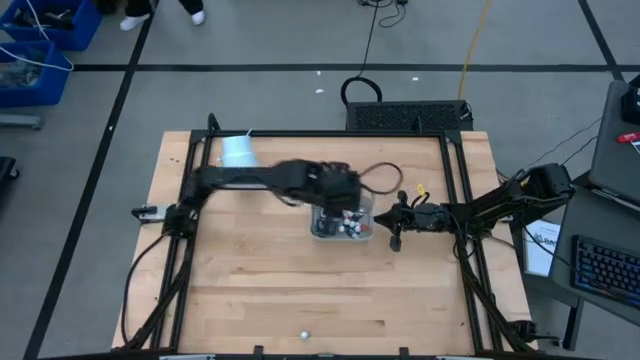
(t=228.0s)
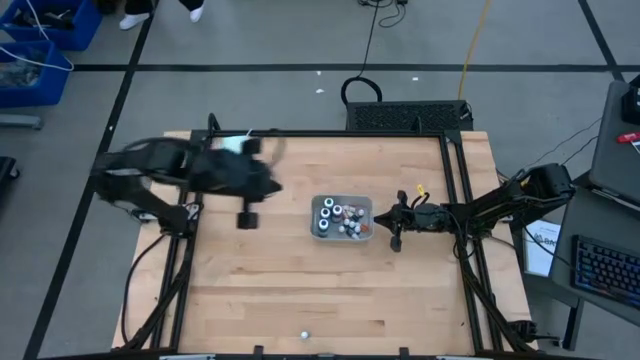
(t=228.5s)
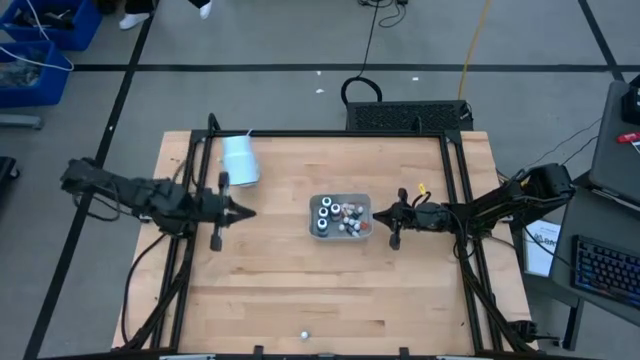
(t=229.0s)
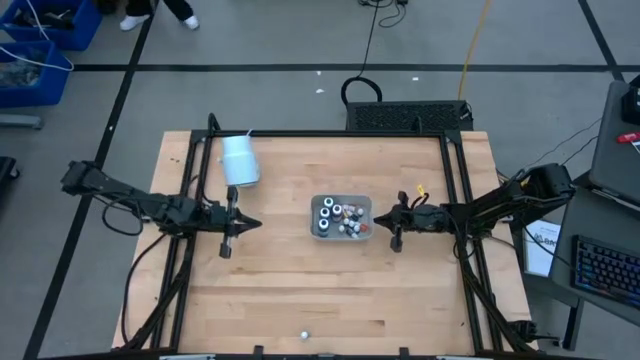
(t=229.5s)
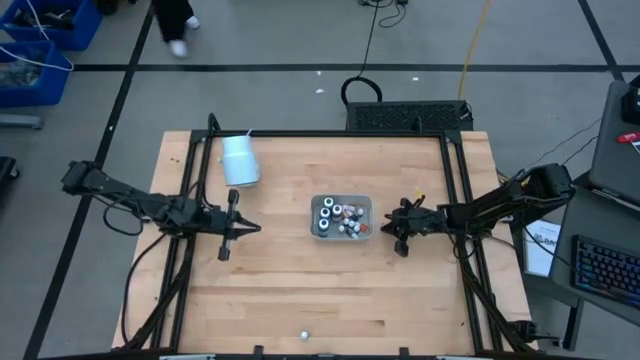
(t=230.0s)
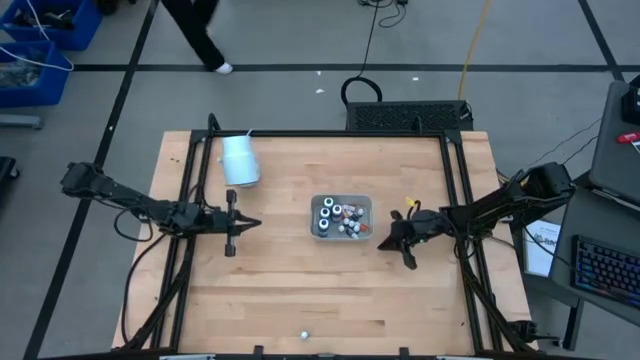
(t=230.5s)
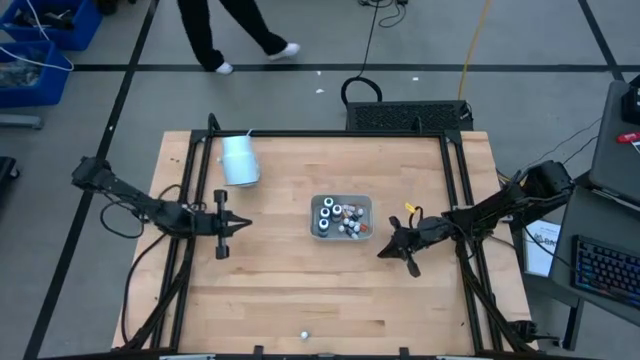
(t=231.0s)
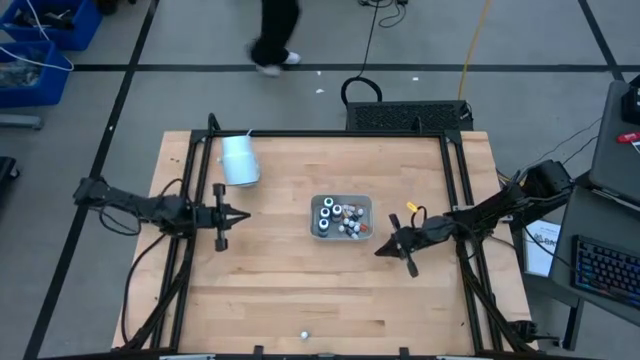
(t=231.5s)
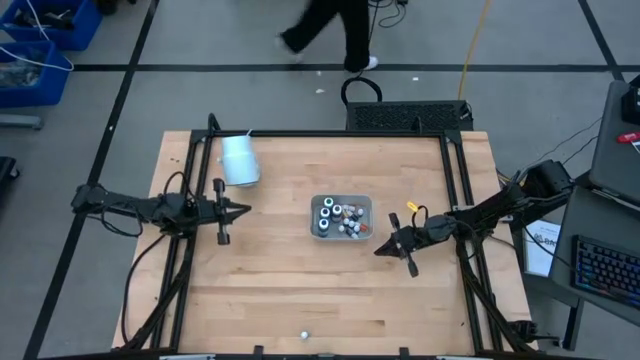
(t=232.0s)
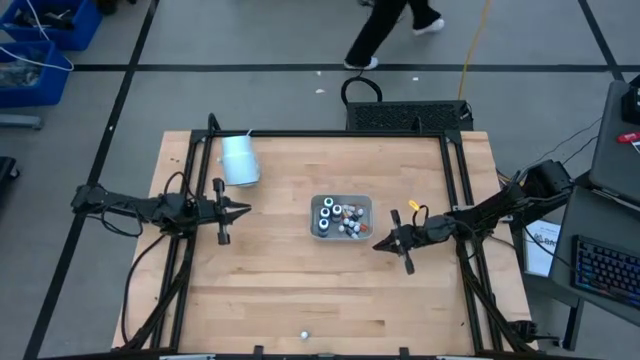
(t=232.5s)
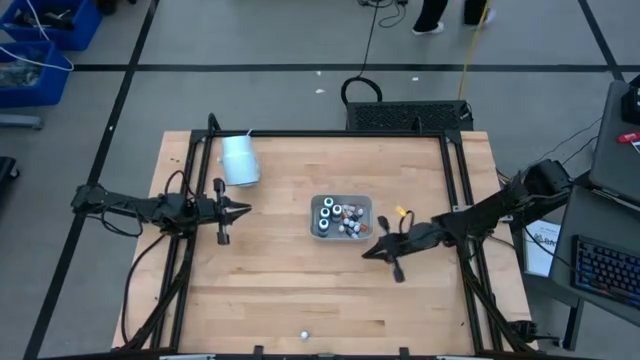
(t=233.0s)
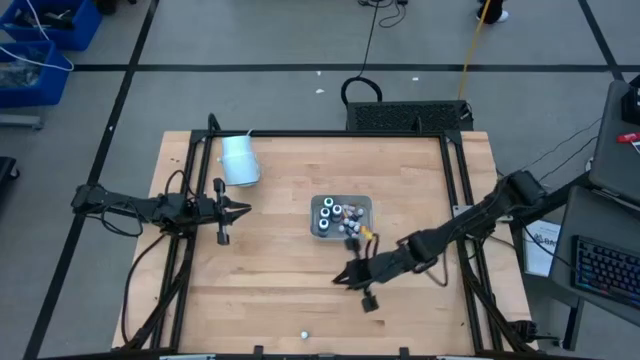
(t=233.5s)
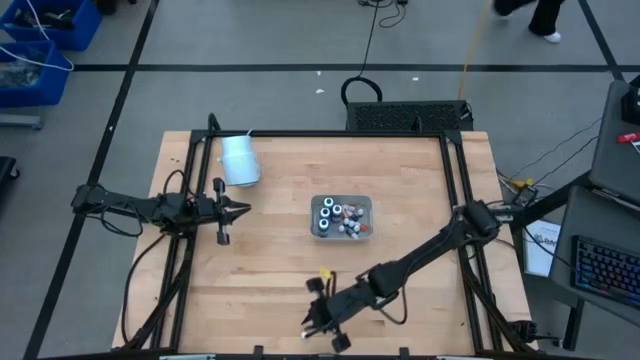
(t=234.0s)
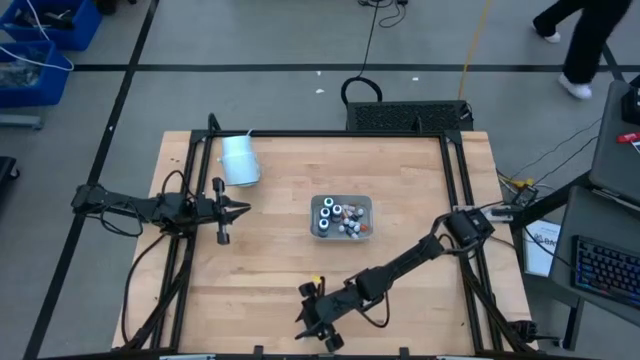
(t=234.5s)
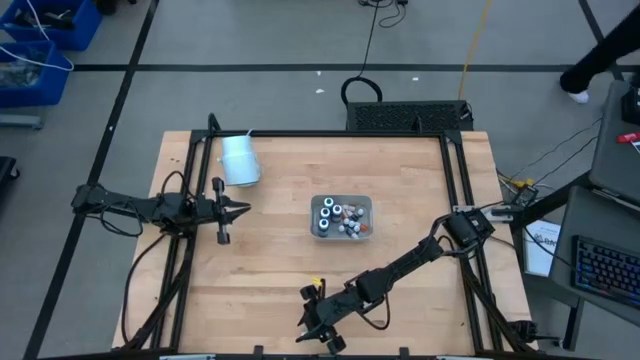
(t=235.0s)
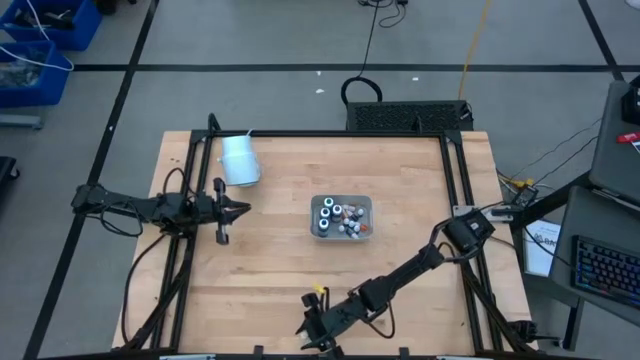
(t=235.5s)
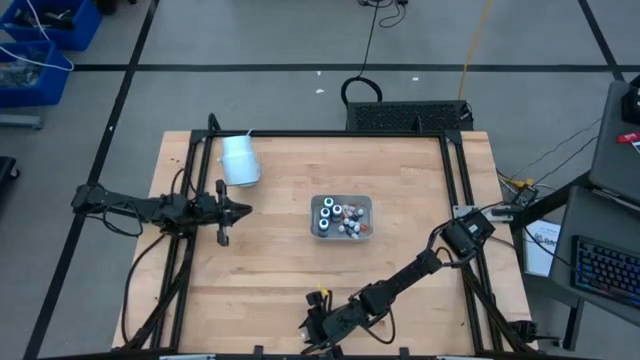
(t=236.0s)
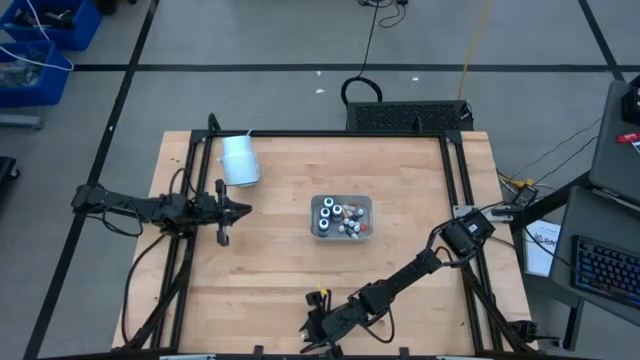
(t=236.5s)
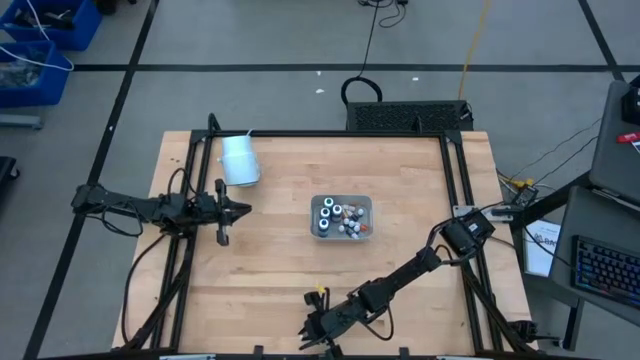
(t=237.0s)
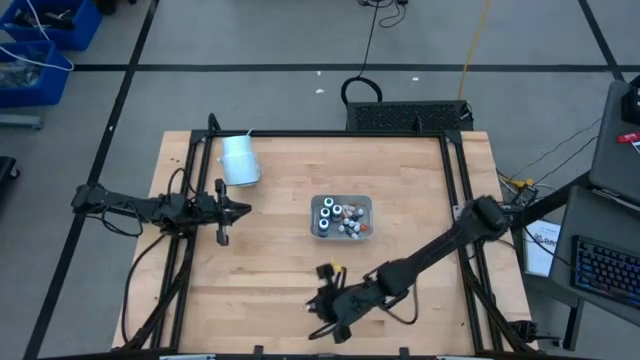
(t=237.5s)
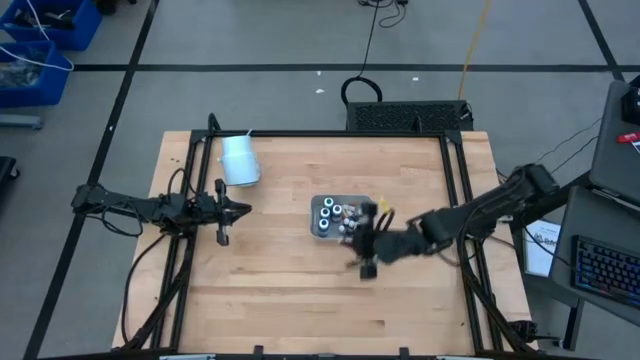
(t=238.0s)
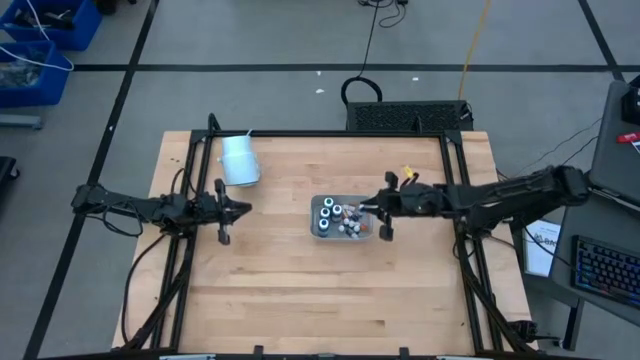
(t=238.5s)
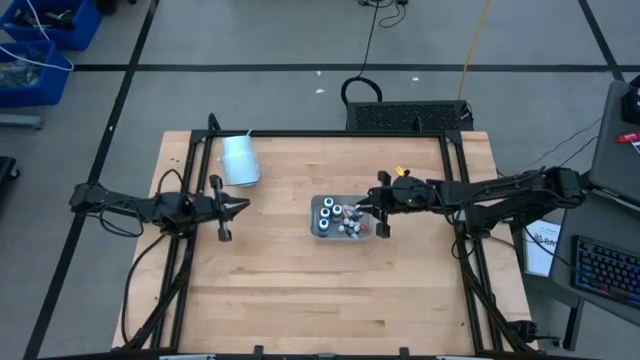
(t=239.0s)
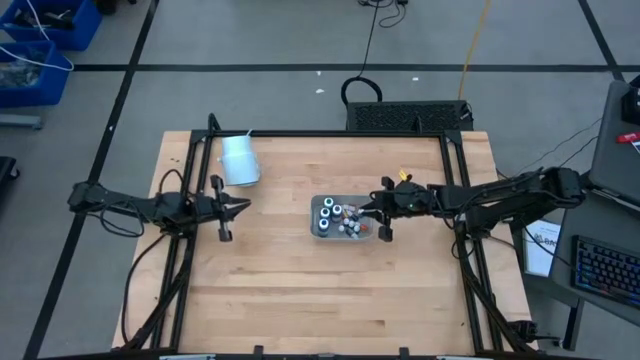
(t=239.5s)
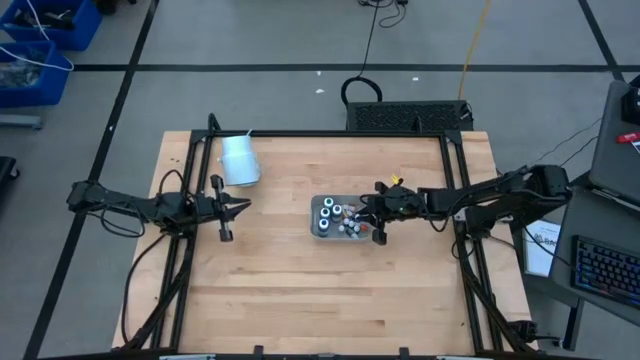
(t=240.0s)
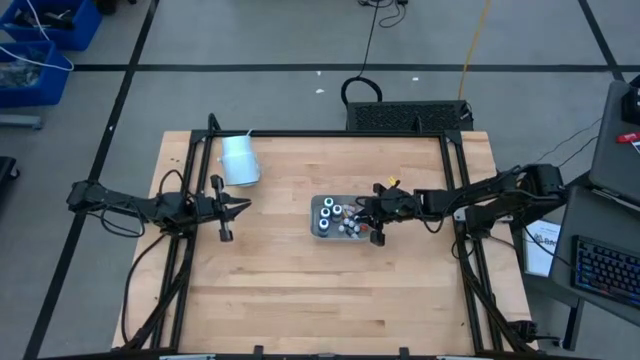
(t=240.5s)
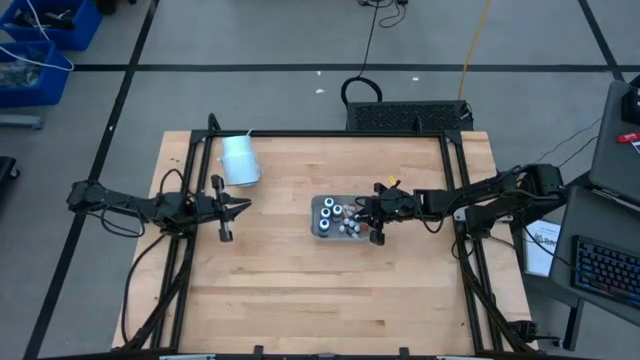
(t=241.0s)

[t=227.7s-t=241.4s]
Task: Pick & Place food coloring
Put the small blue food coloring bottle into the bin

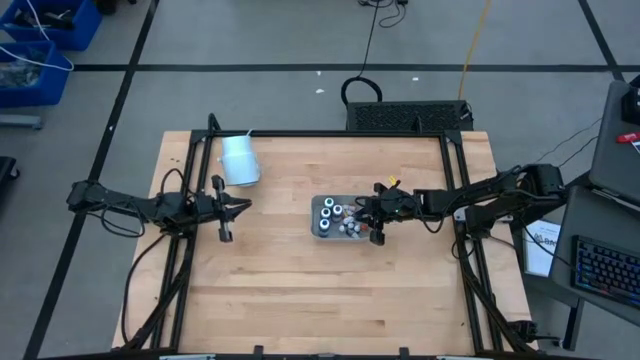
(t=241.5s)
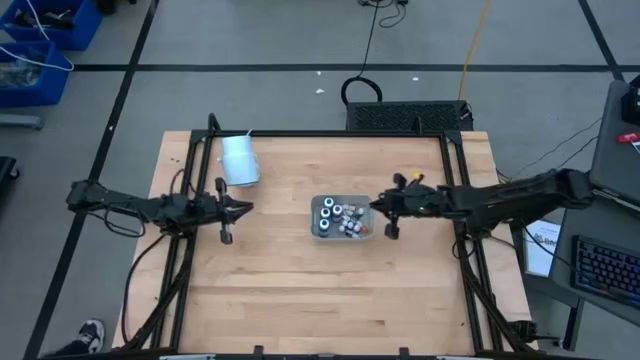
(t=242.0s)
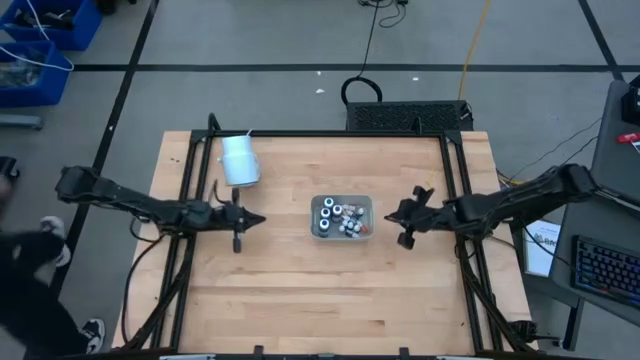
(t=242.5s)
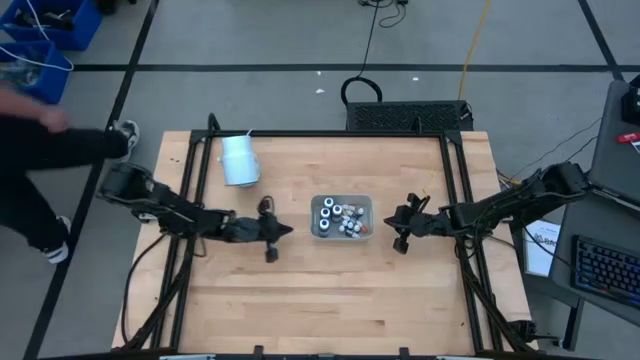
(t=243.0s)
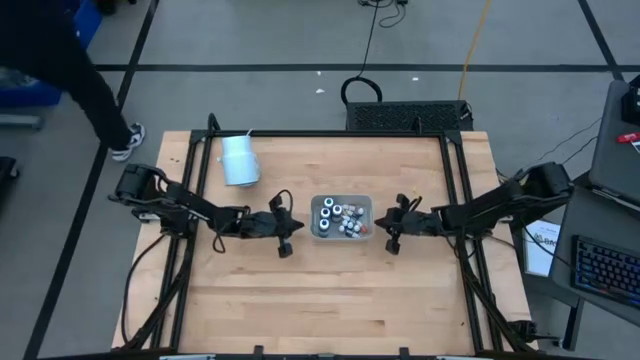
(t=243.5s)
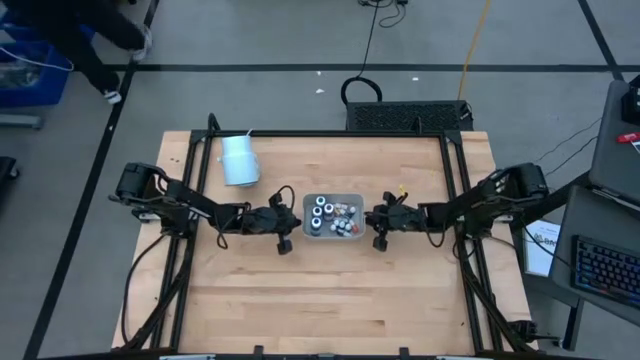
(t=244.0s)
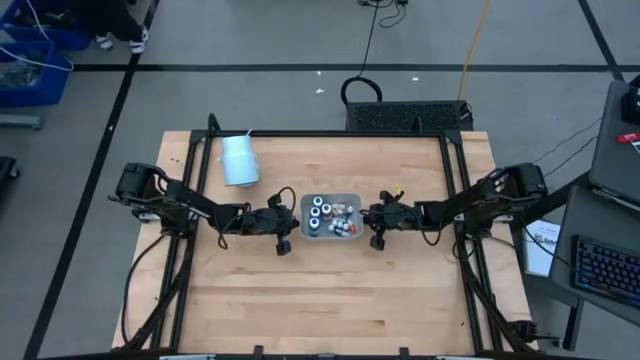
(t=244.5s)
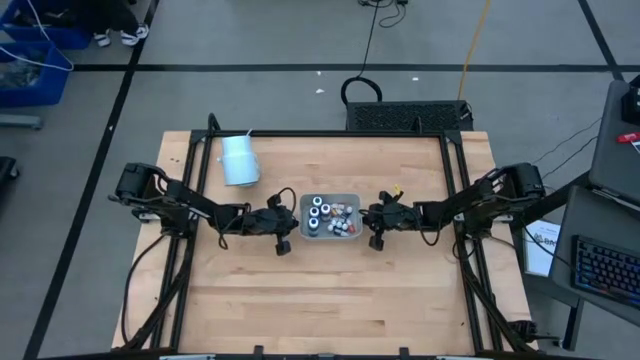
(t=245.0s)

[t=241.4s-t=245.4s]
Adjust the bin

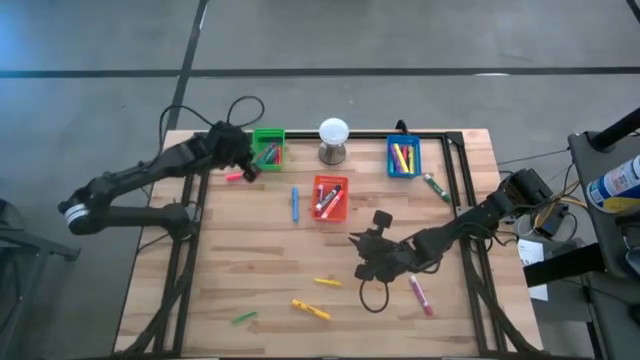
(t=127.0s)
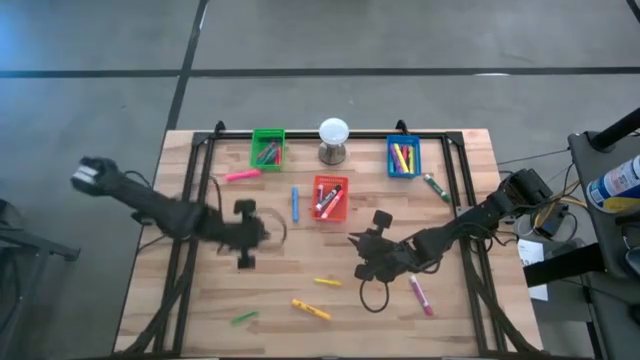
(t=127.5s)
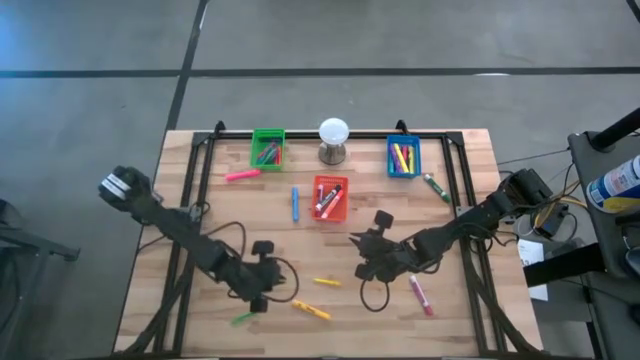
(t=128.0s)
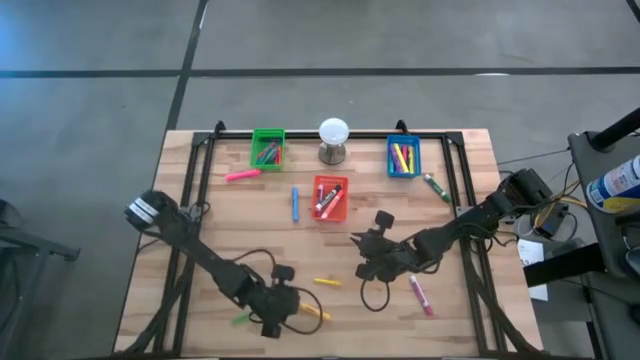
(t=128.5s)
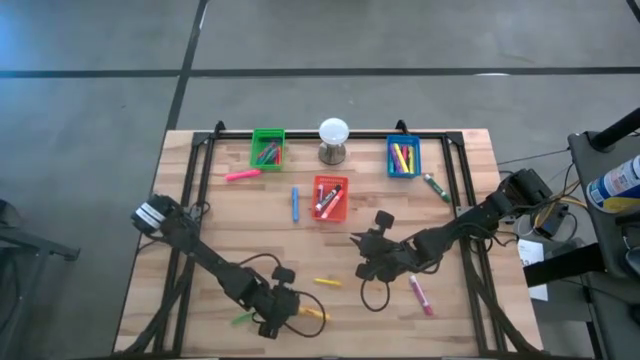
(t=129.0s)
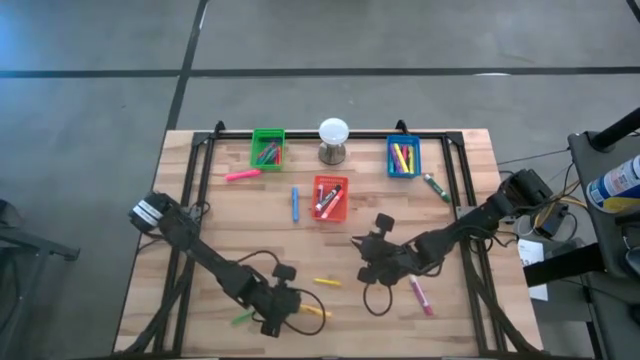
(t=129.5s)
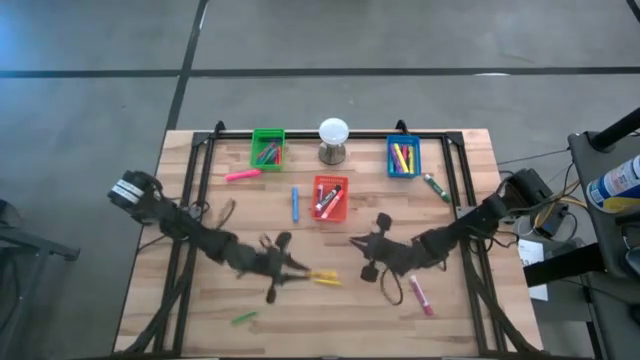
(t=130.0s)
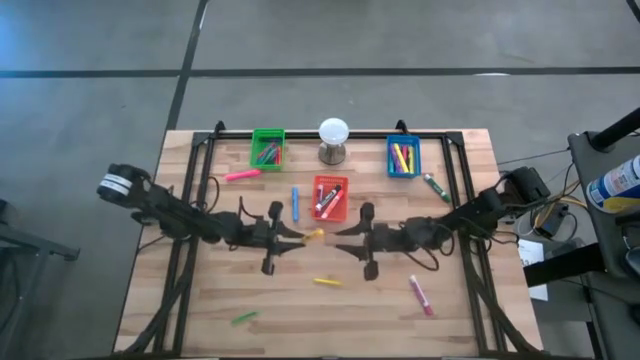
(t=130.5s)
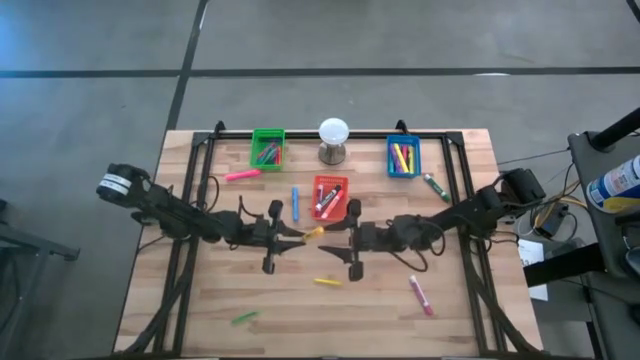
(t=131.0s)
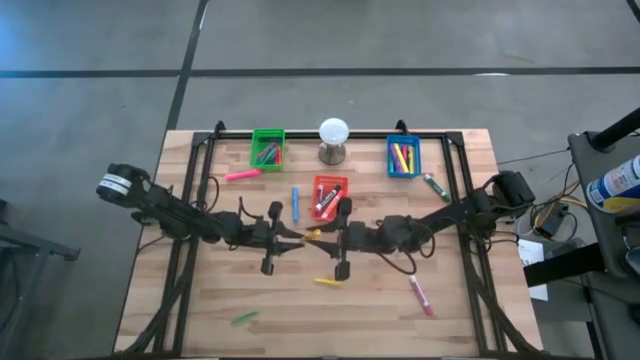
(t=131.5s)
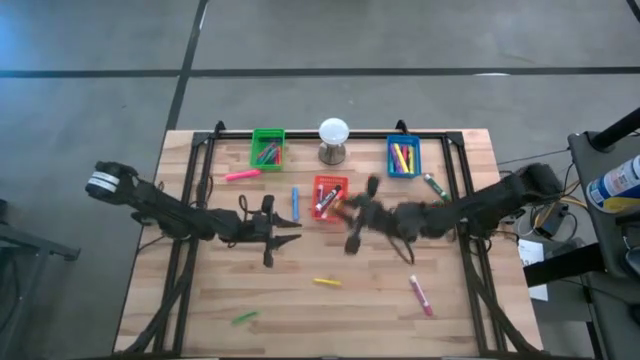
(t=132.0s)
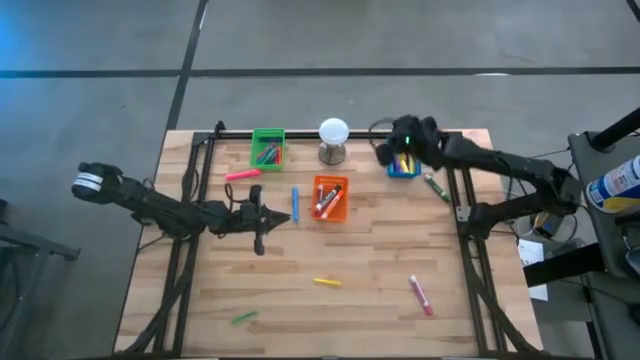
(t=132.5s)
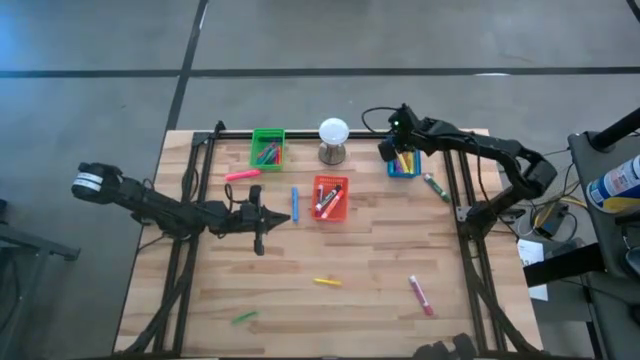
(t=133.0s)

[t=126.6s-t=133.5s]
Task: Pick & Place Markers
Put the dark yellow highlighter into the blue bin
